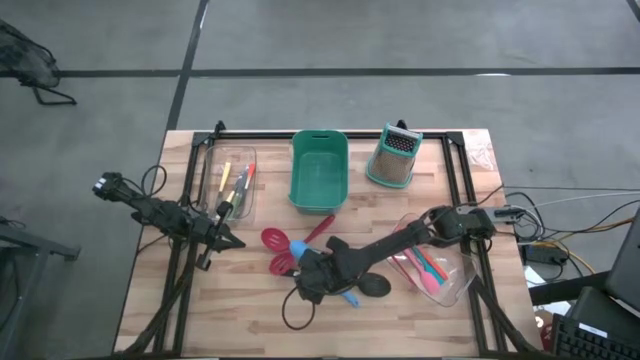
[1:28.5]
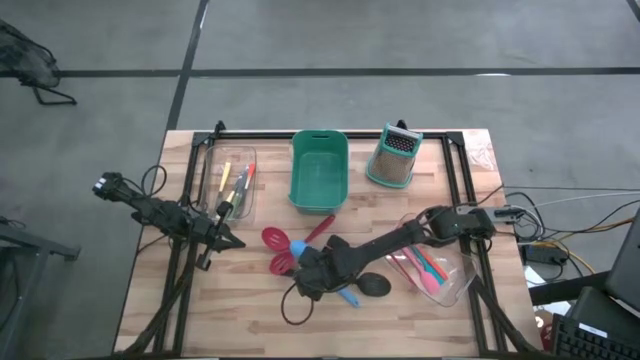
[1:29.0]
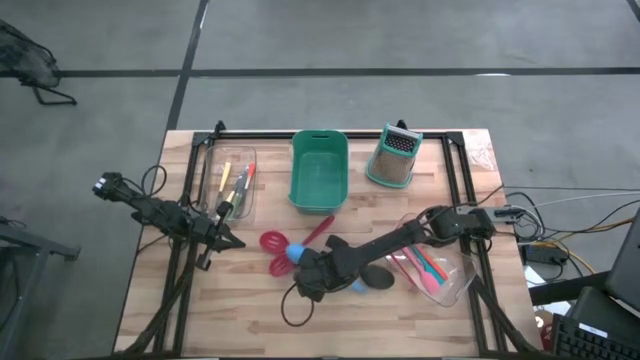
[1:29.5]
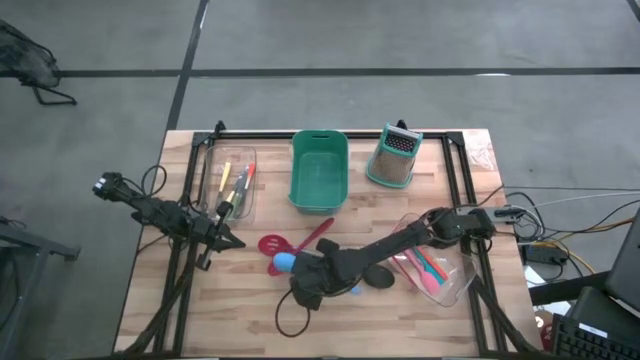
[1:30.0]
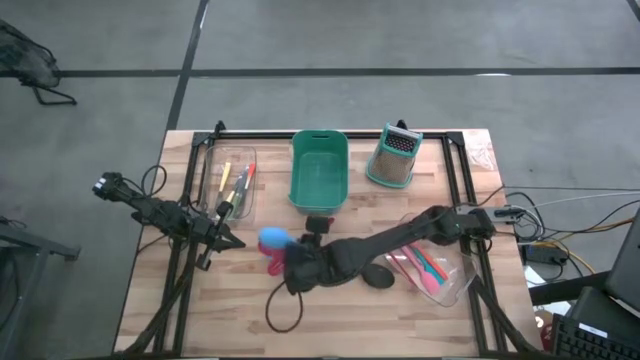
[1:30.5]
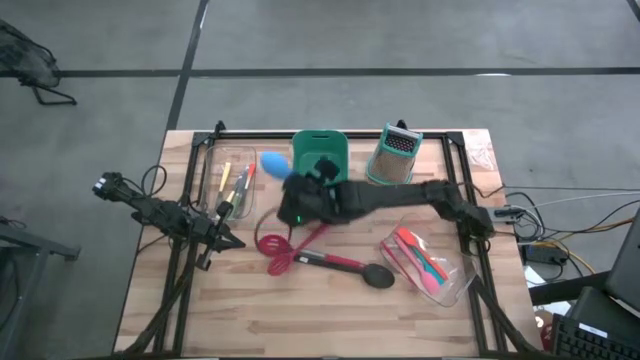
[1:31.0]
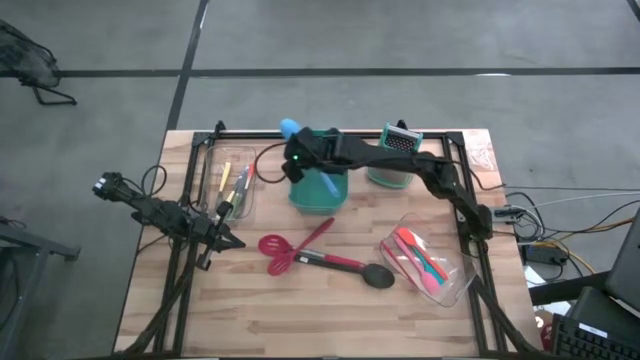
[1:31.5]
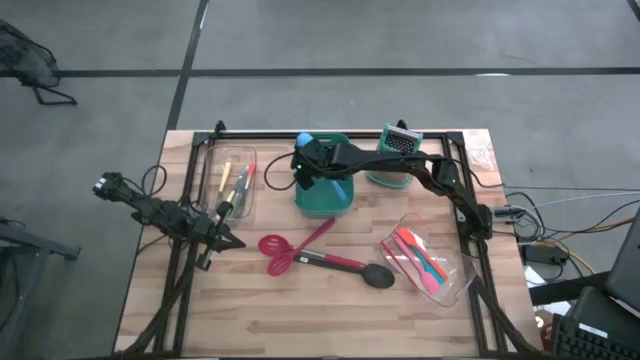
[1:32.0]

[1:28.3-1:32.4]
Task: Pick & Place Kitchen Items
Put the blue serving spoon into the green bin

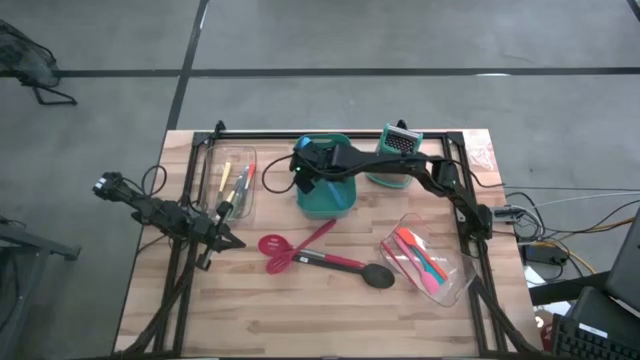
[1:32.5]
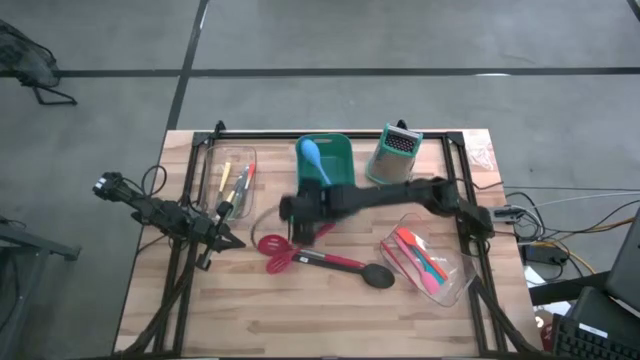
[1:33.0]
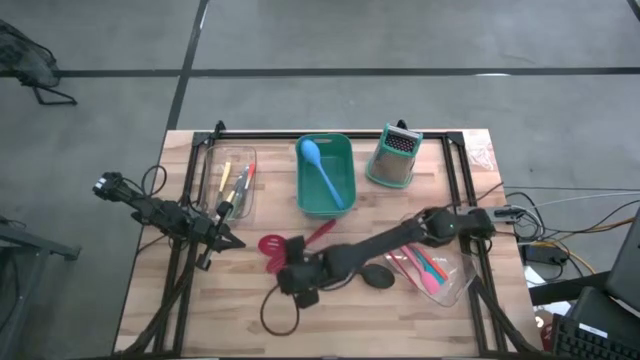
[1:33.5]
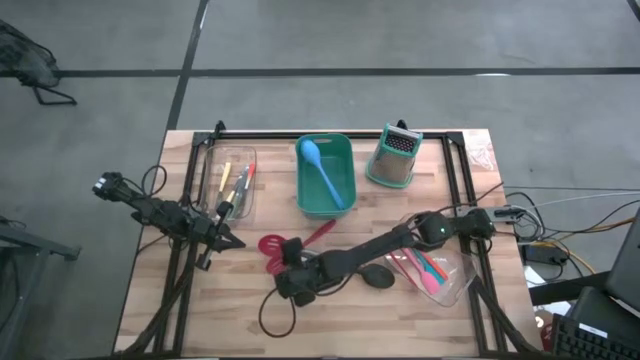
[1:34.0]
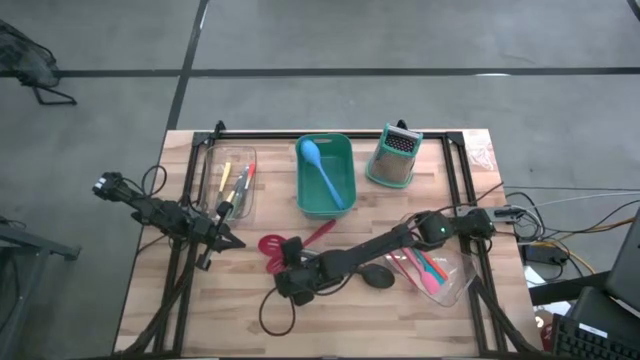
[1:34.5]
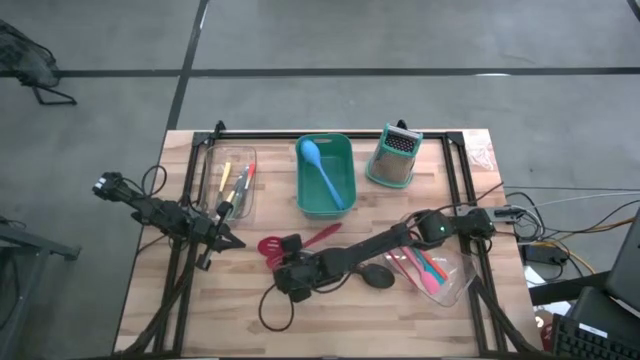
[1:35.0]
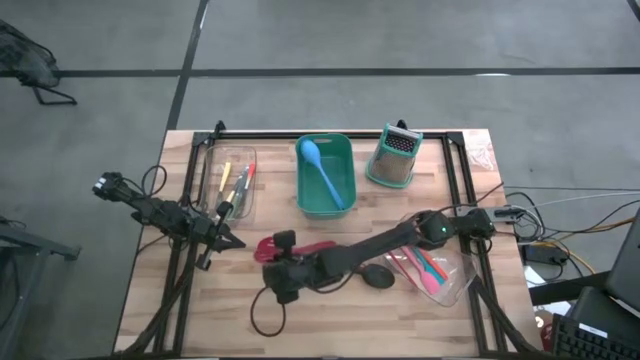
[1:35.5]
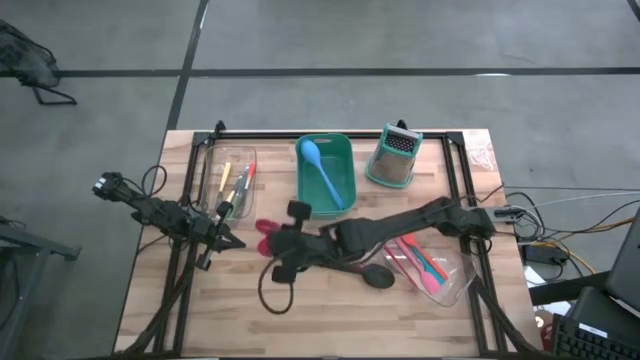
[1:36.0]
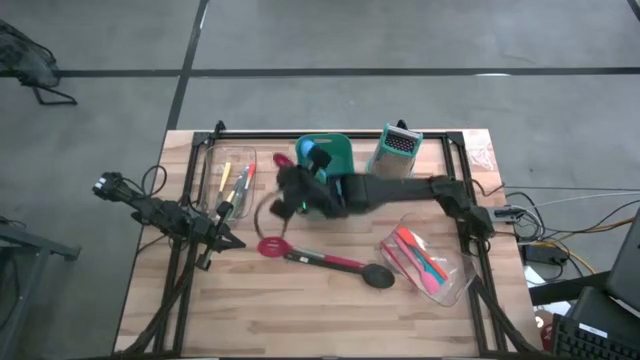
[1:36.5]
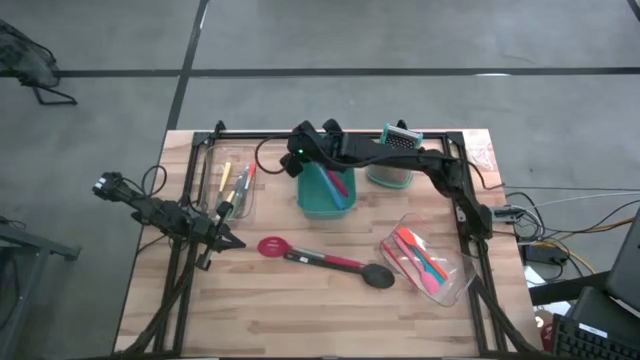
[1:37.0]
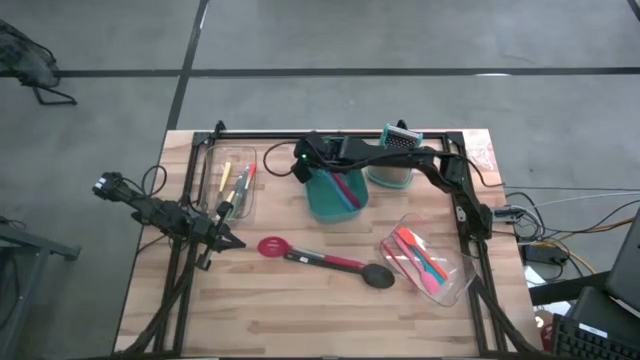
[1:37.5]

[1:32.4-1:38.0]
Put the red serving spoon into the green bin

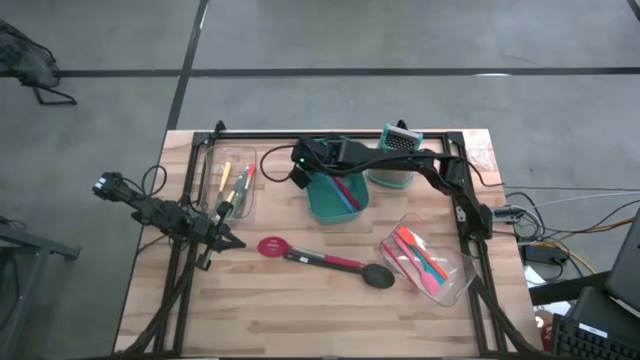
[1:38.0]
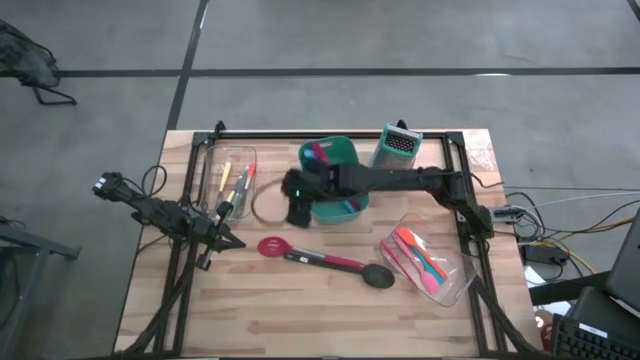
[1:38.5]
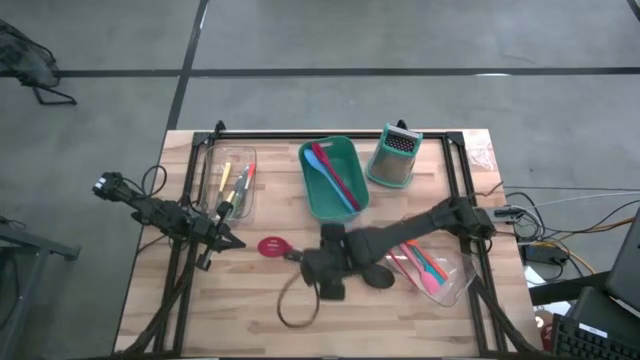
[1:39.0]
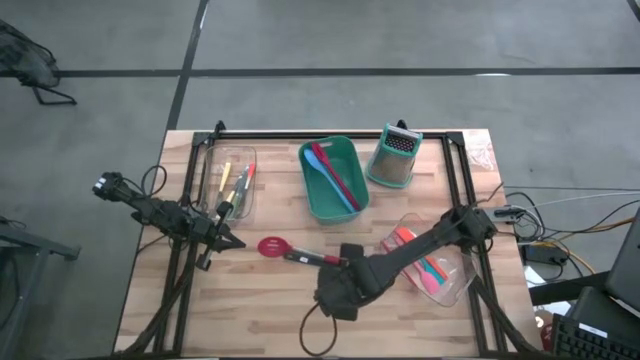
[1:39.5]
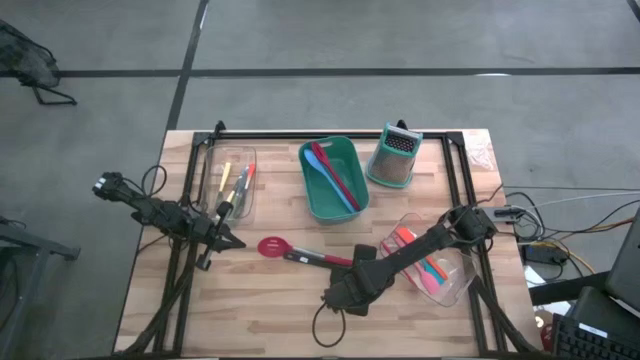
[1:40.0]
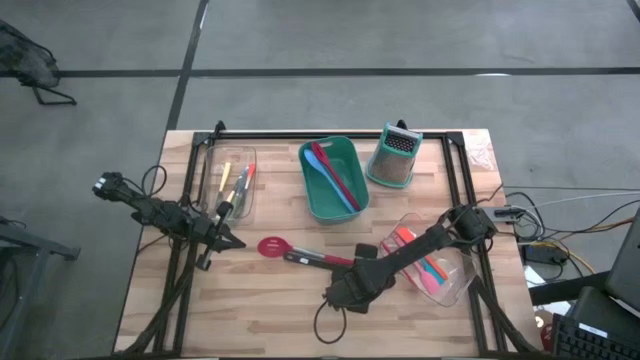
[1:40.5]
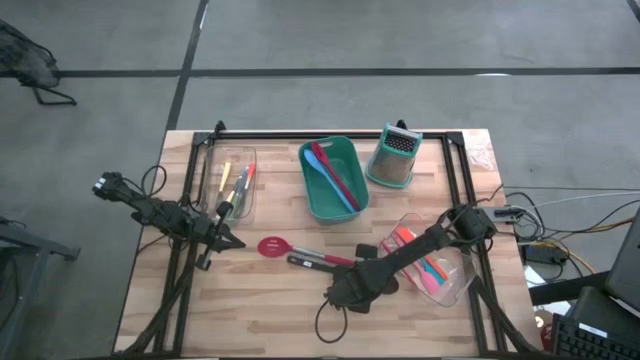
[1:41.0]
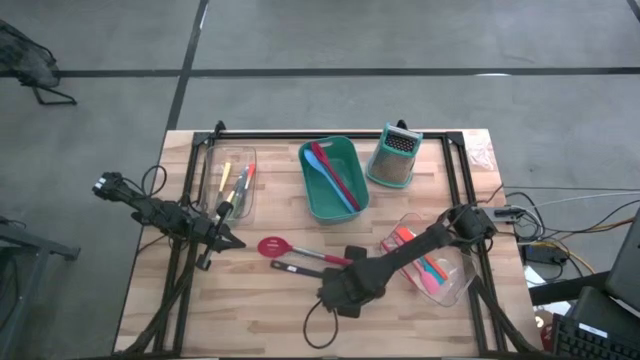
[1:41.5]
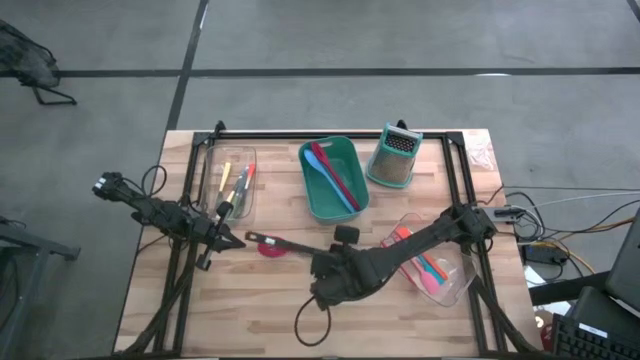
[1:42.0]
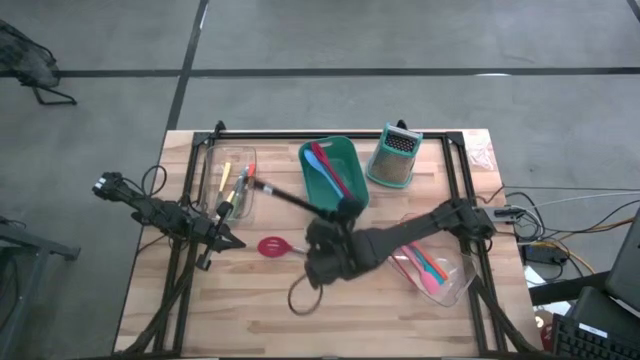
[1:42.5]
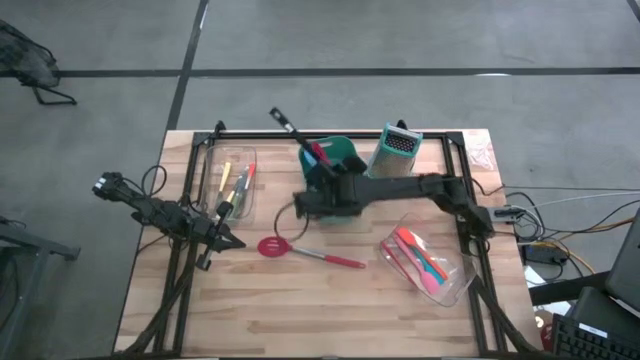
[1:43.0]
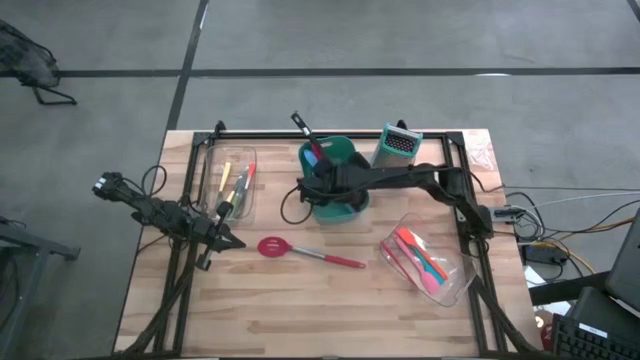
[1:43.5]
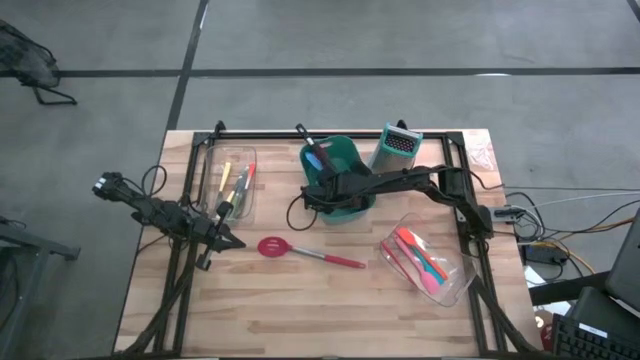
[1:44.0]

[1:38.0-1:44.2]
Put the black serving spoon into the green bin

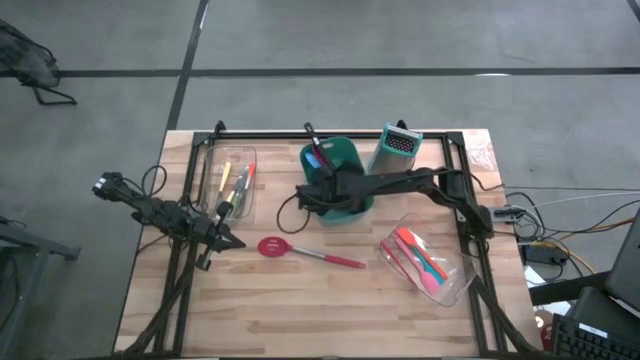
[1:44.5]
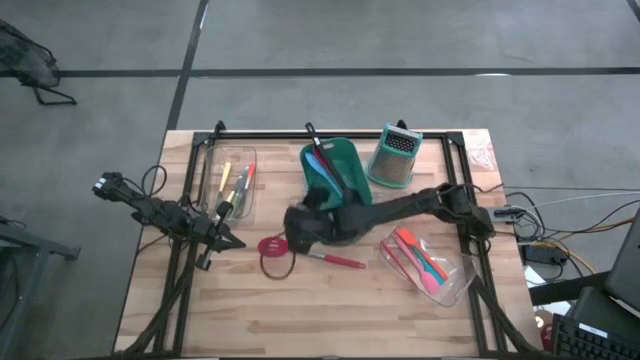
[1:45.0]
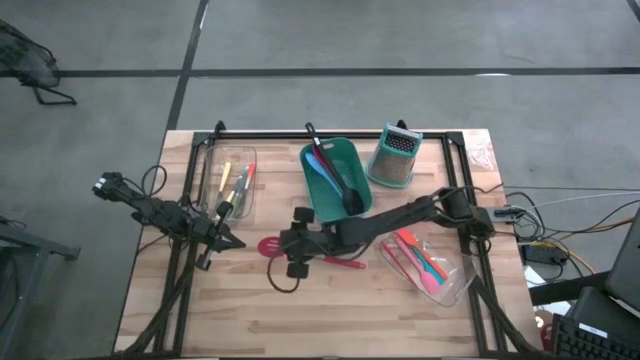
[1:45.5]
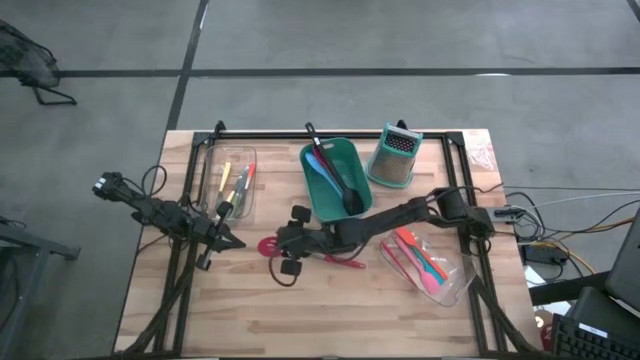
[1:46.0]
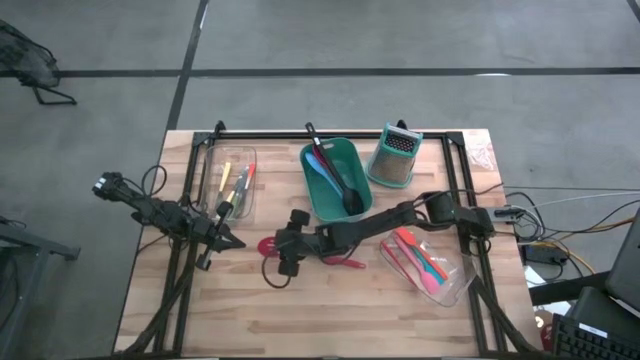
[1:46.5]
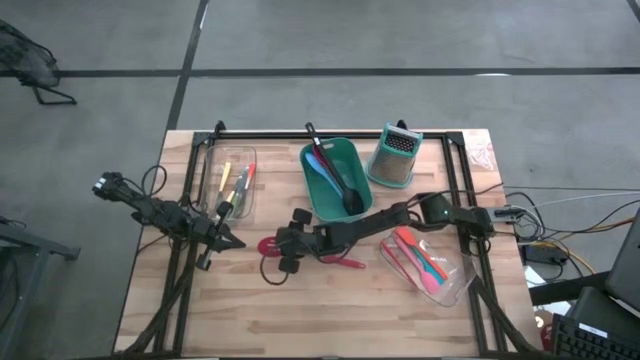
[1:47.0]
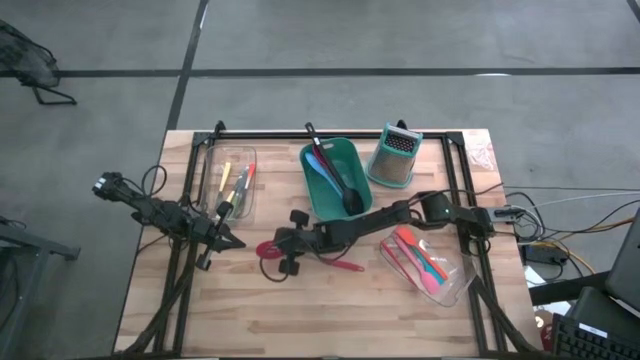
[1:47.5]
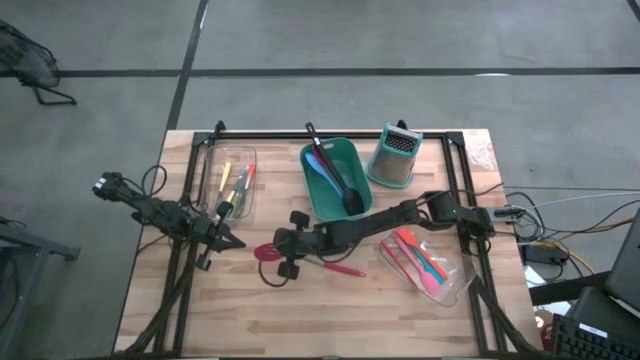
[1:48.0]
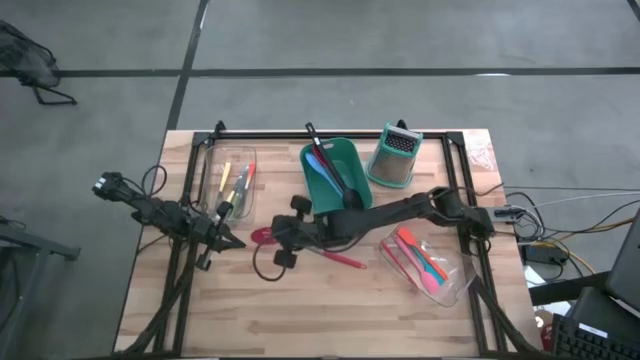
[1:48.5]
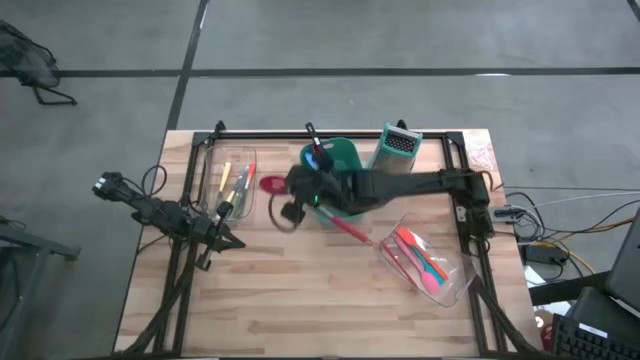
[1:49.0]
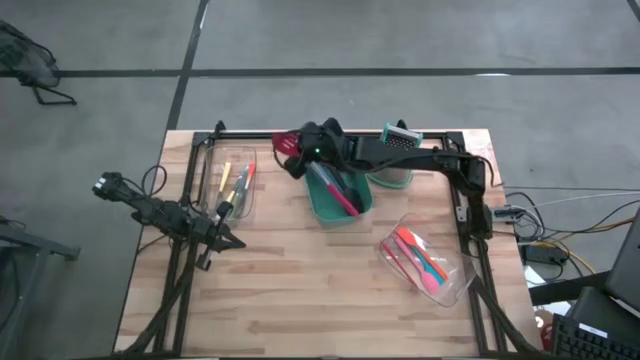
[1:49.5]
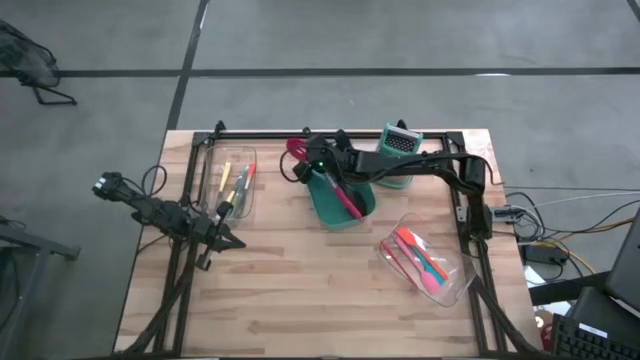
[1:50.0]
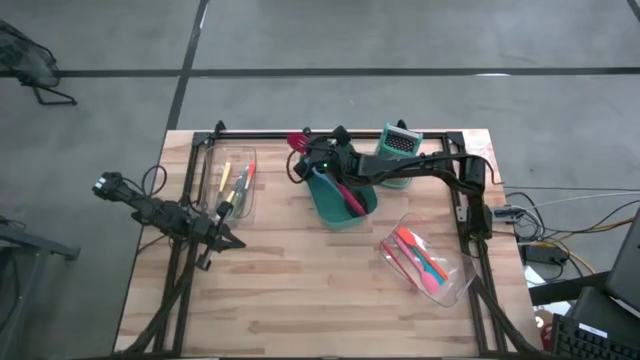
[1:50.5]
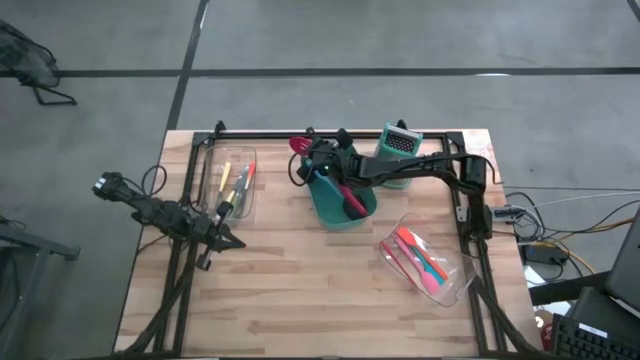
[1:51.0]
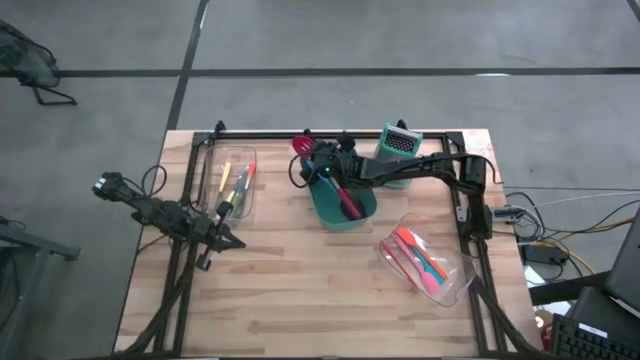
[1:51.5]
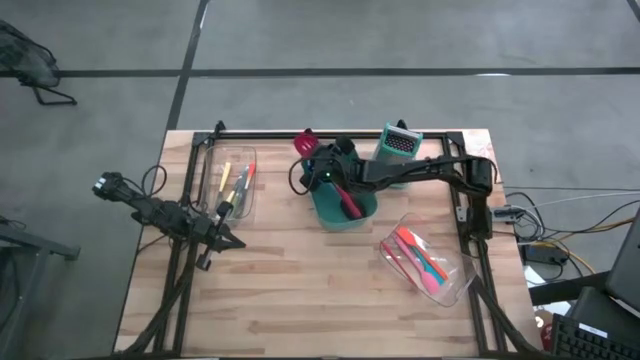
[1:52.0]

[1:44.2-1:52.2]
Put the silver and red serving spoon into the green bin
